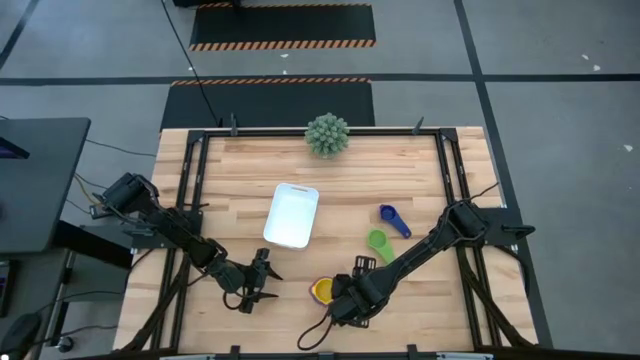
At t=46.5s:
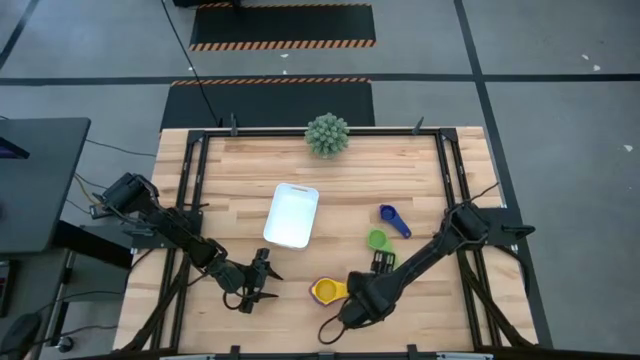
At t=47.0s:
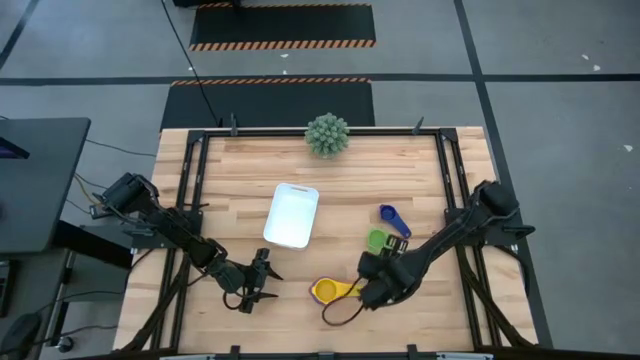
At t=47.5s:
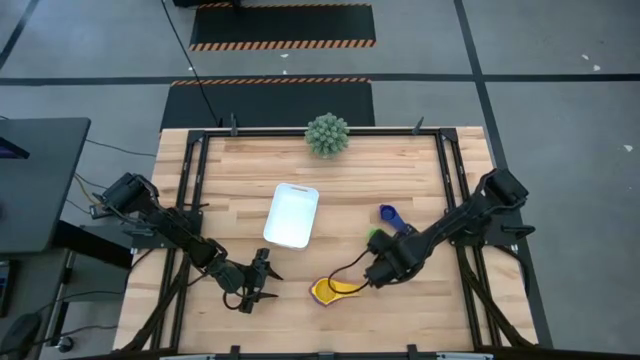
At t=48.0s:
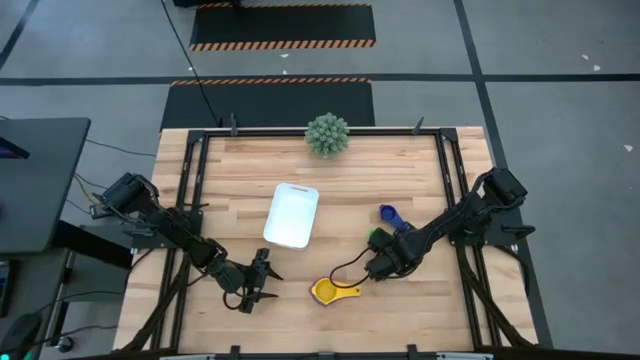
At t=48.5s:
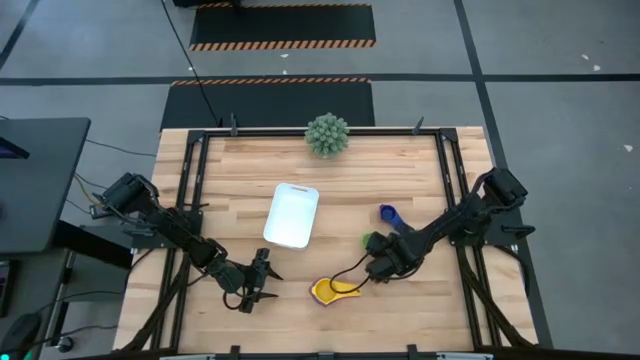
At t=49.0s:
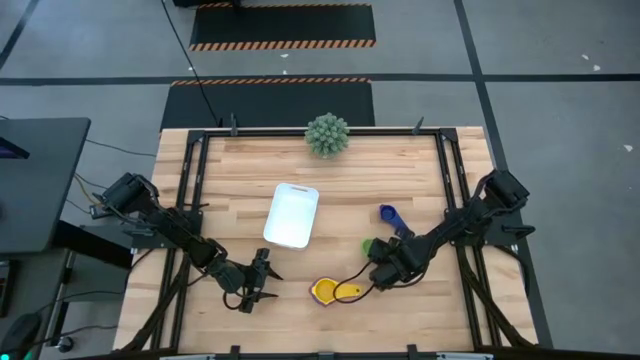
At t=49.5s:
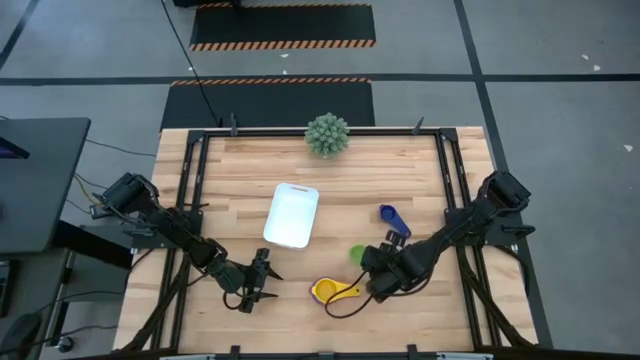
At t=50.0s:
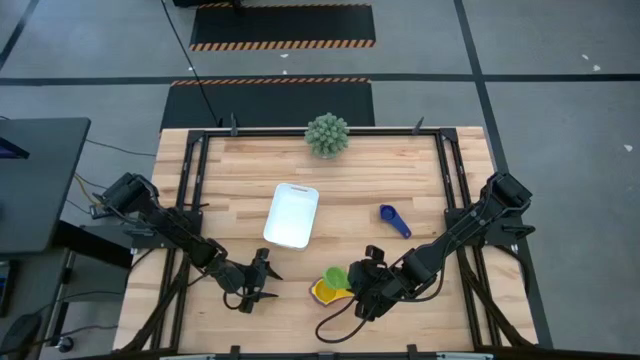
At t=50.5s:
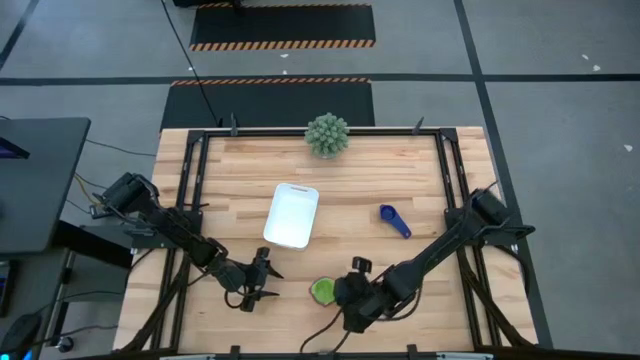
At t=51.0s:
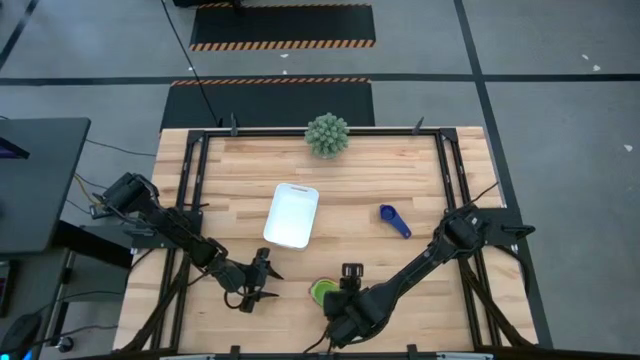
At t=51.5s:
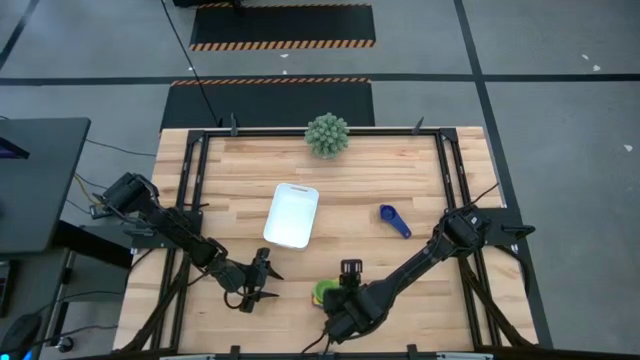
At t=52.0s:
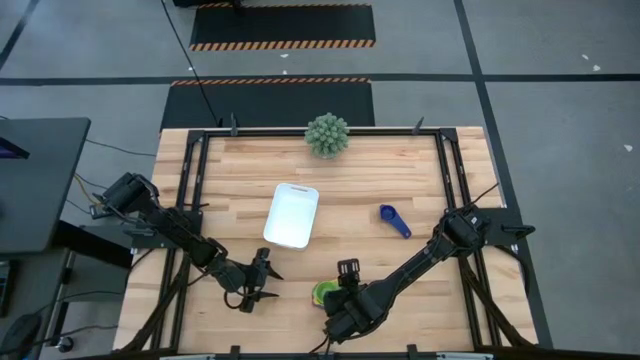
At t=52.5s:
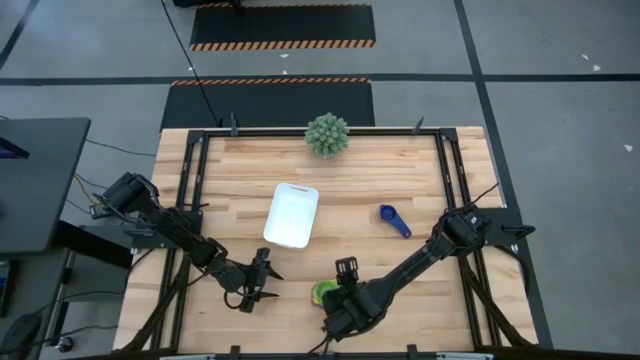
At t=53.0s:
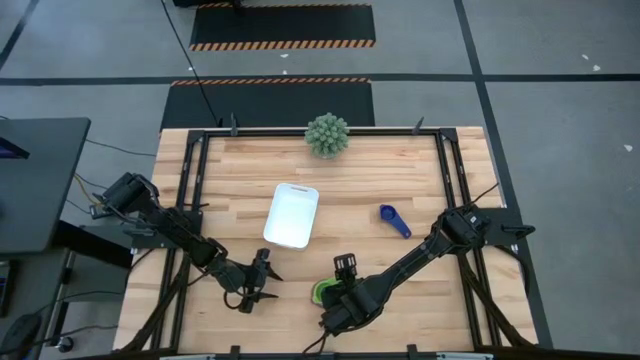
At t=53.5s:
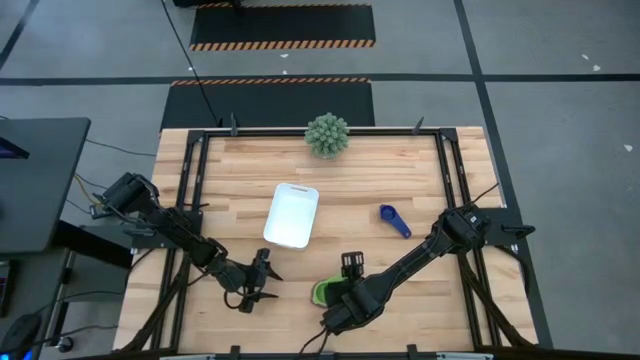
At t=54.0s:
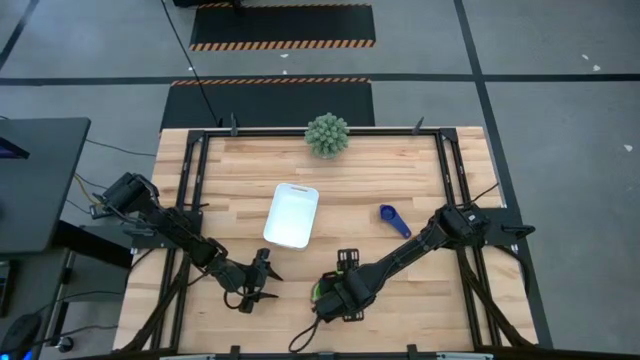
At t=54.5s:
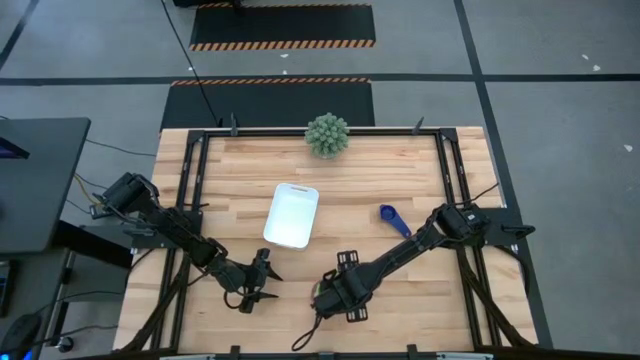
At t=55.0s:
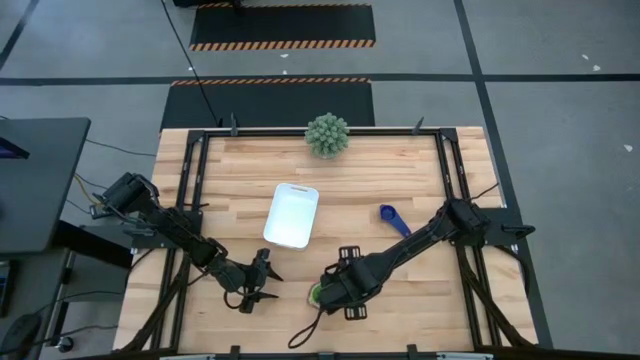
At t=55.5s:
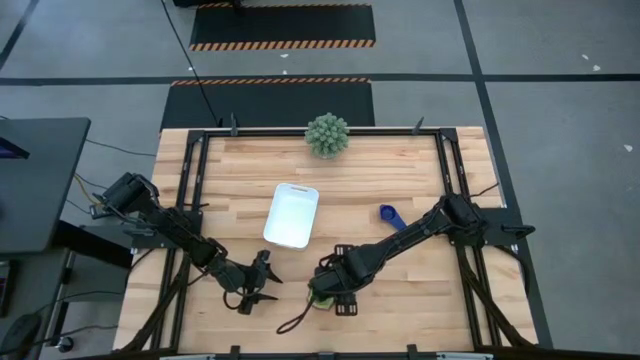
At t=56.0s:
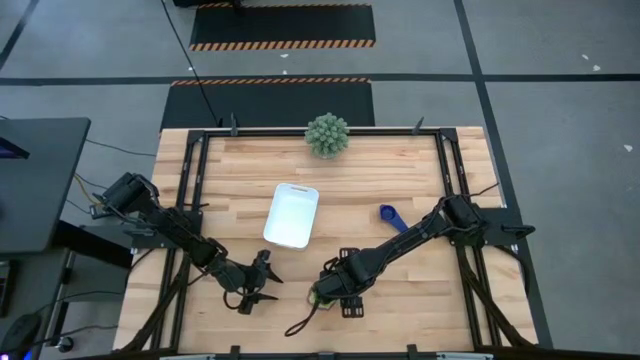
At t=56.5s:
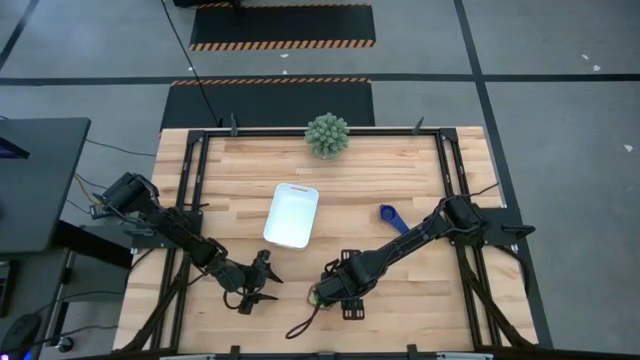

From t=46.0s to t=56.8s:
Task: Nest measuring cups in basket
Stack the green measuring cup on the top of the yellow measuring cup

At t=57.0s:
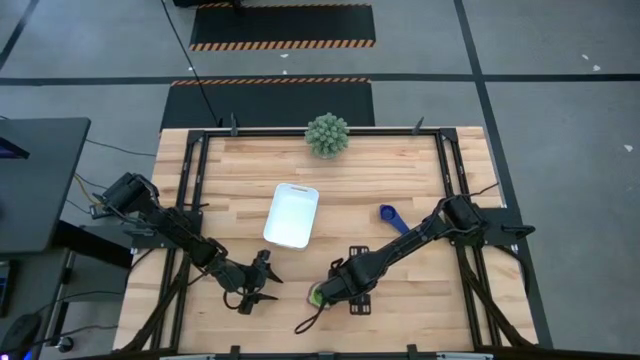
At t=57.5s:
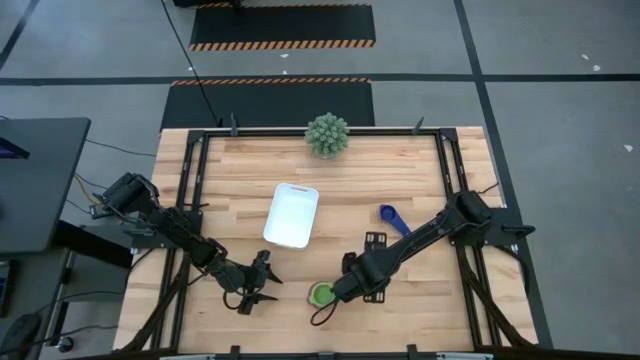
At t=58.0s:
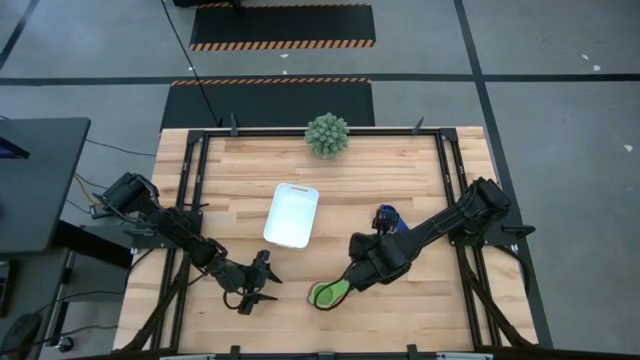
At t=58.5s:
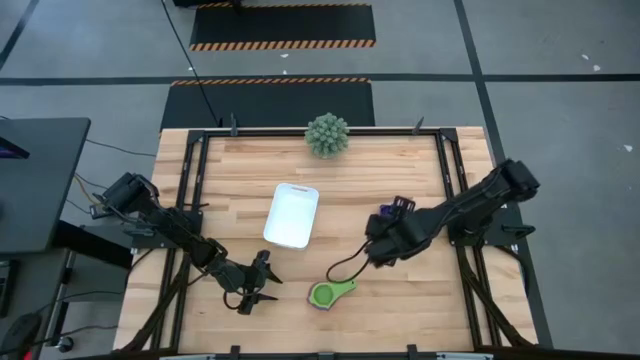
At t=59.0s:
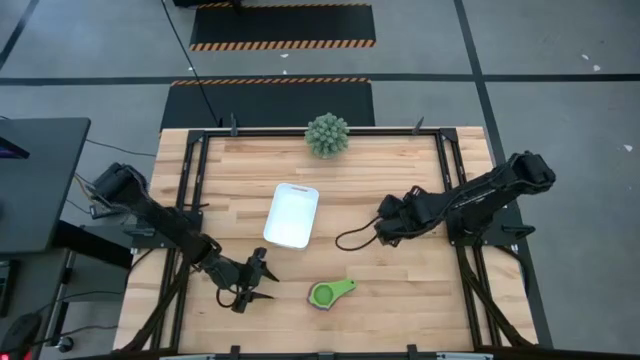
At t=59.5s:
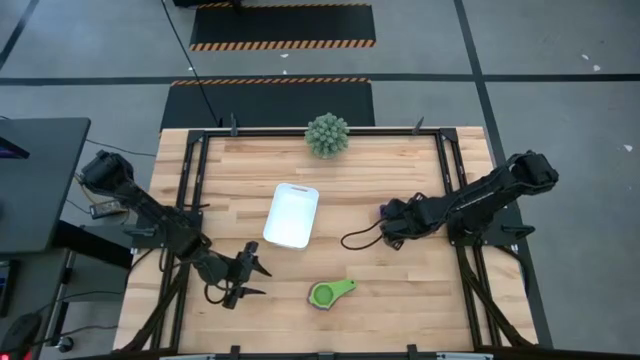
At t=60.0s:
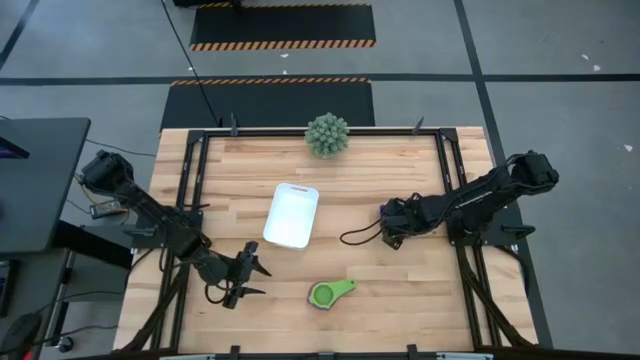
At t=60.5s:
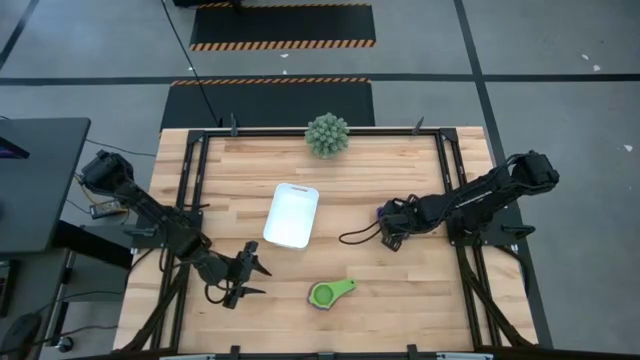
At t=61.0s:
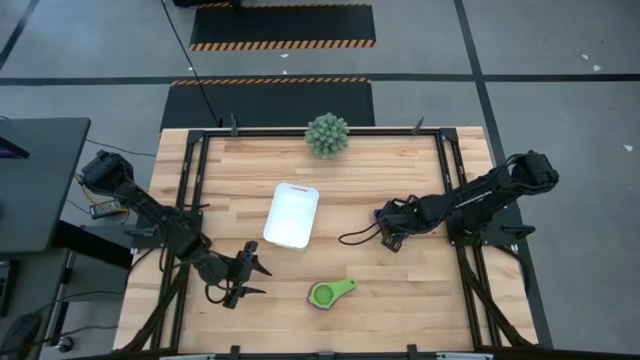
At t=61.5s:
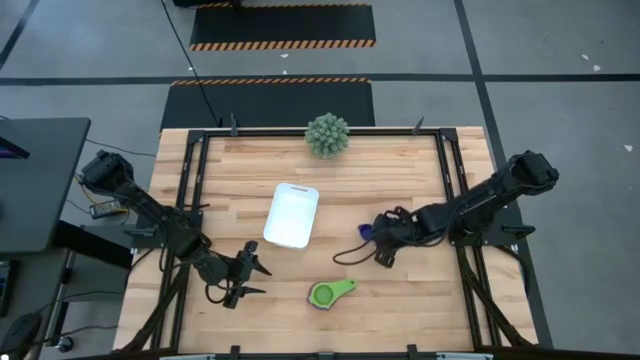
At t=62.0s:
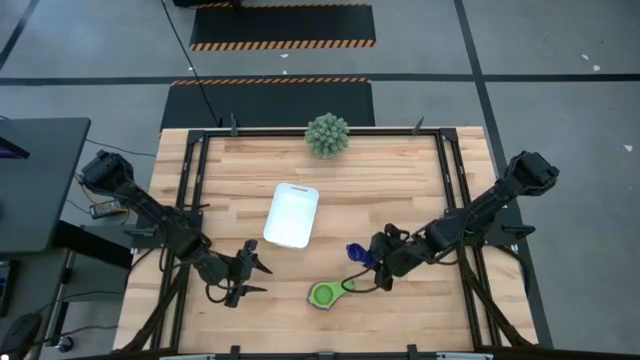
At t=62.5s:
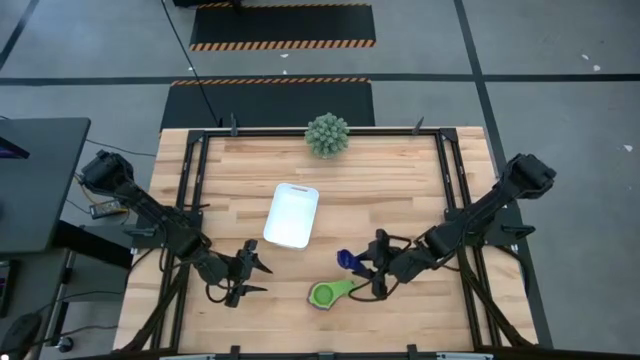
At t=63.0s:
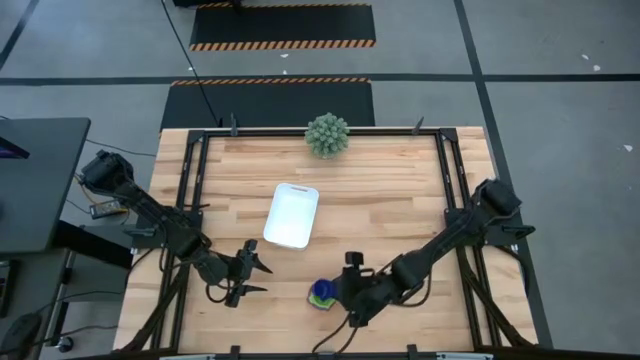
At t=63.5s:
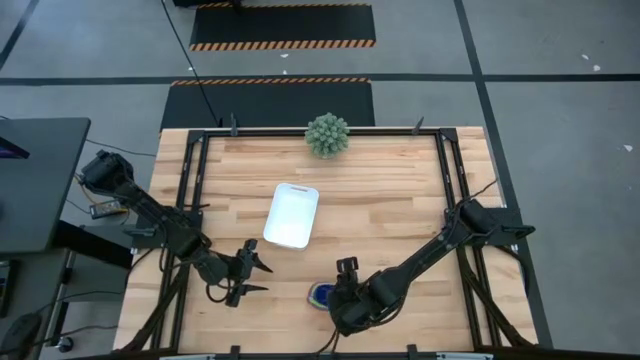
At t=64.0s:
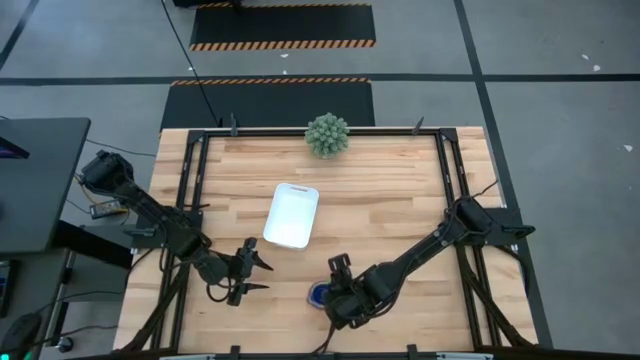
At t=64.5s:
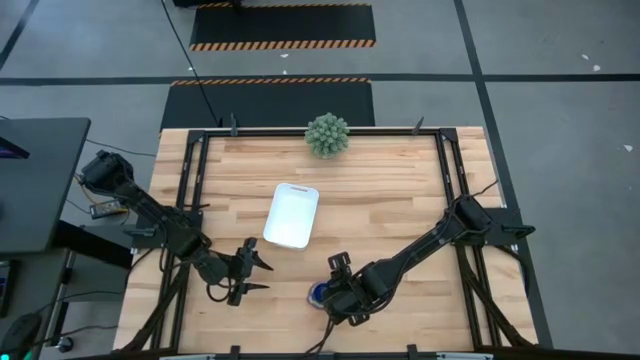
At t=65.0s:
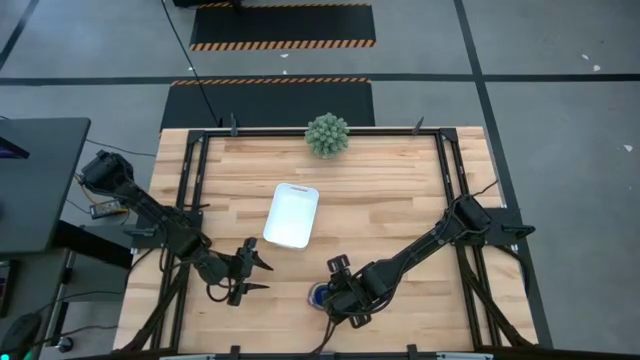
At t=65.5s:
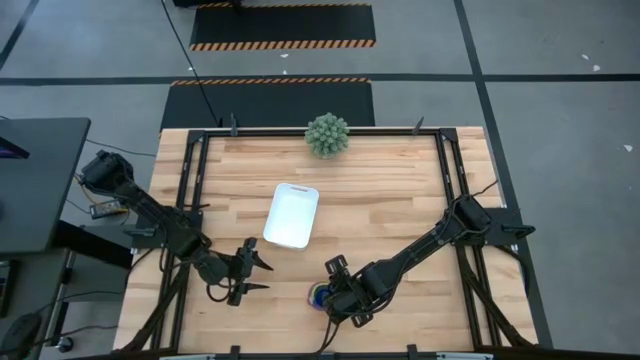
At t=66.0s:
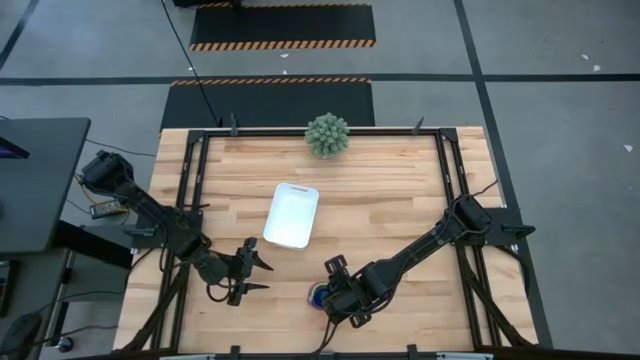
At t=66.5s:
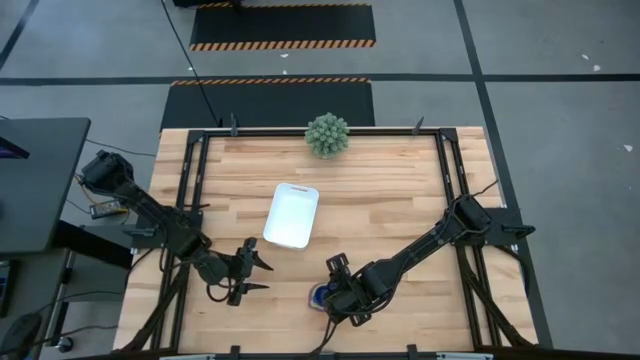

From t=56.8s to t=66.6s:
Stack the dark blue measuring cup into the green measuring cup
